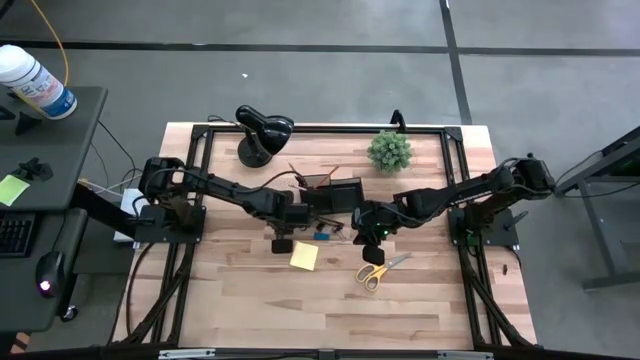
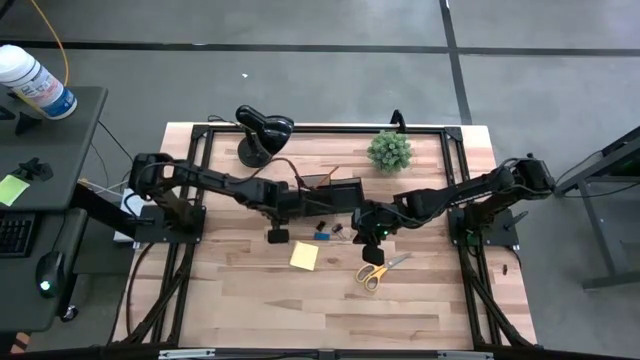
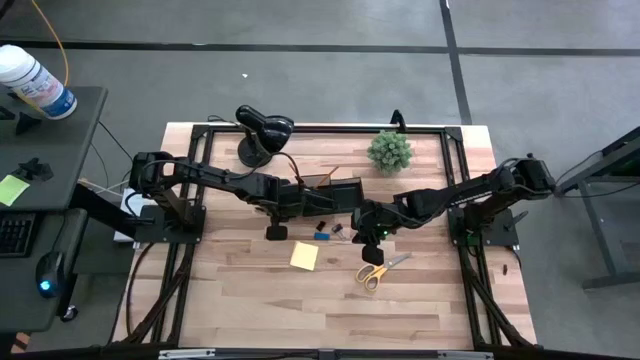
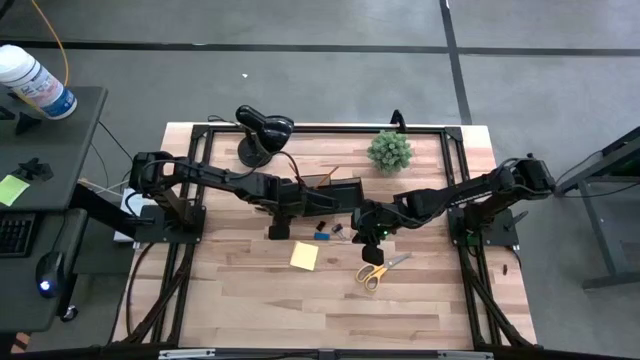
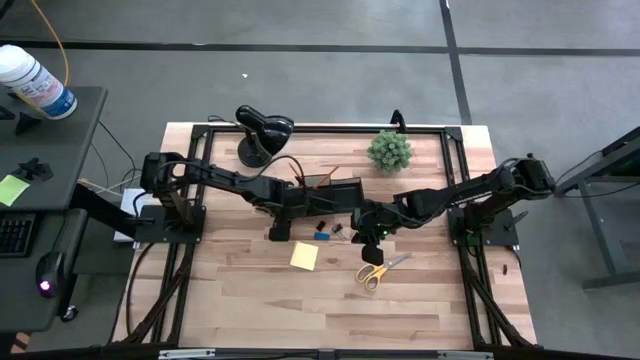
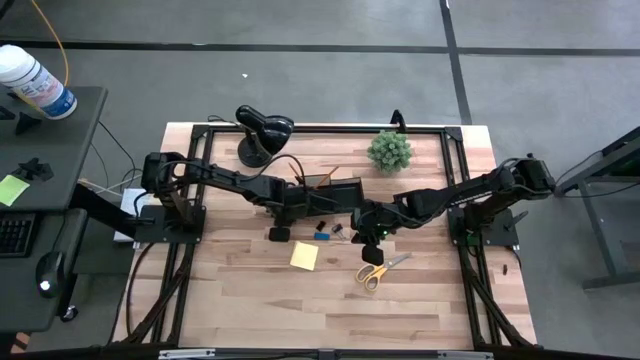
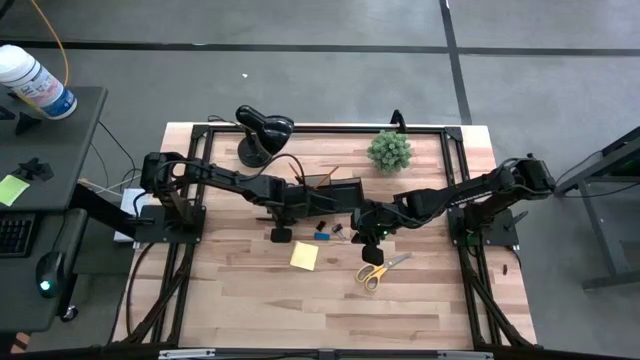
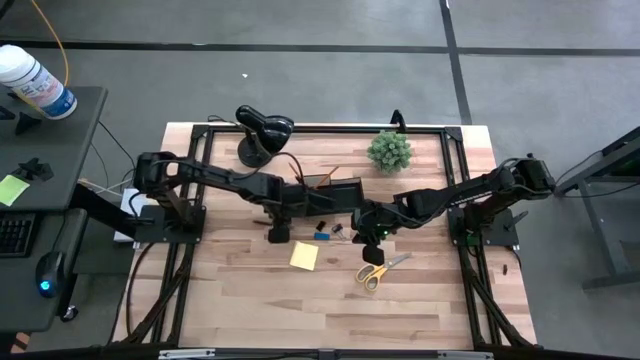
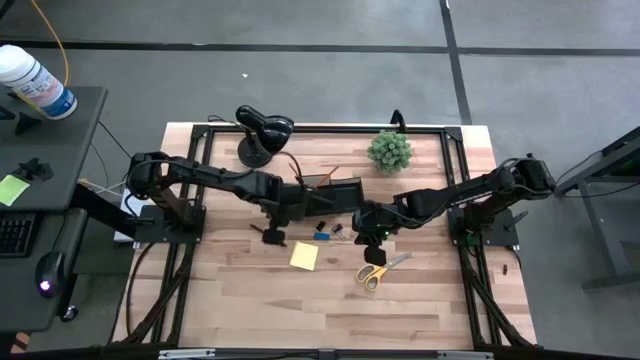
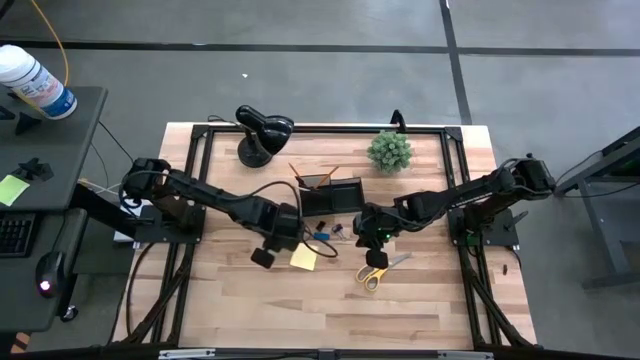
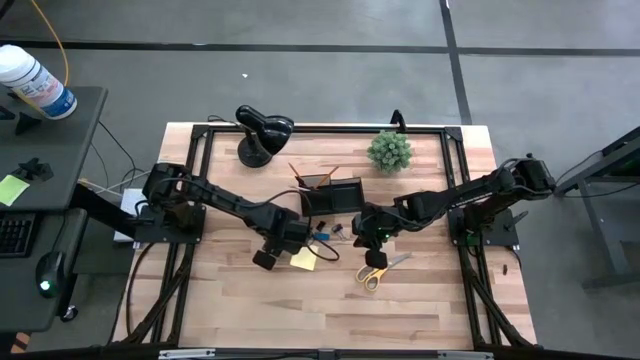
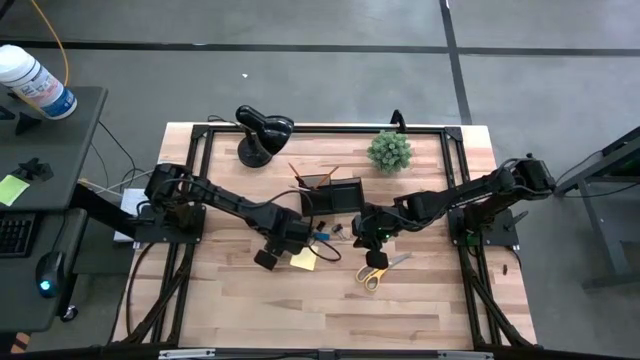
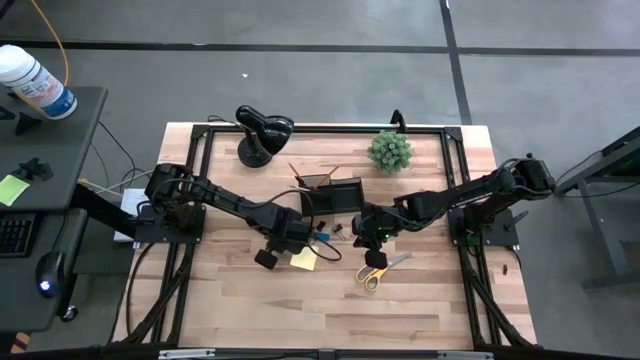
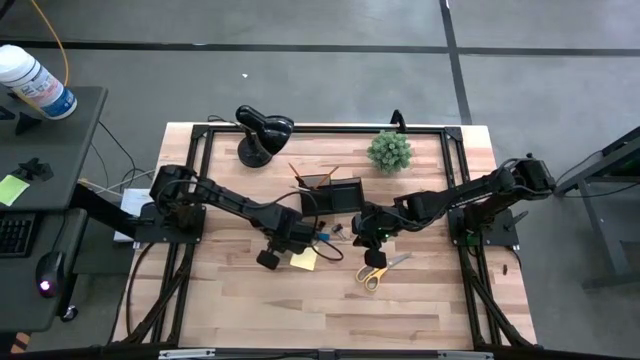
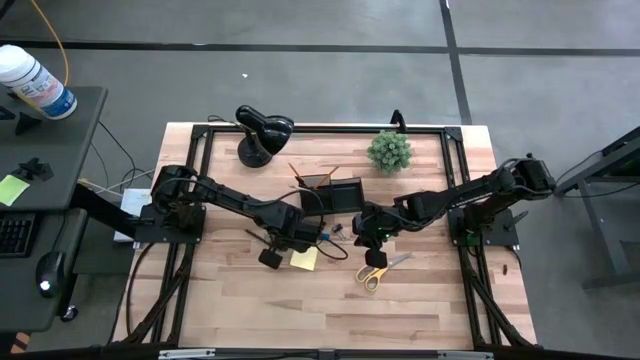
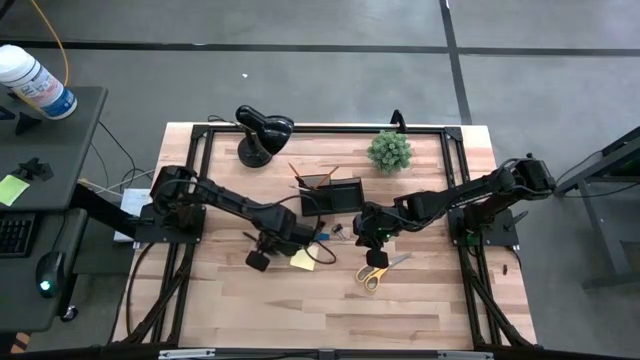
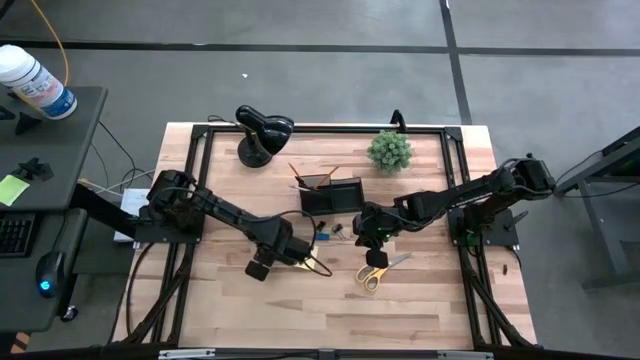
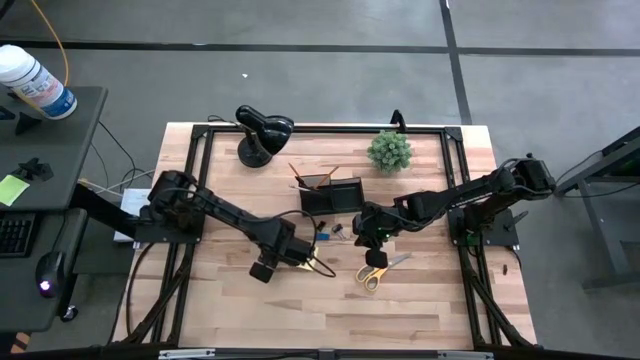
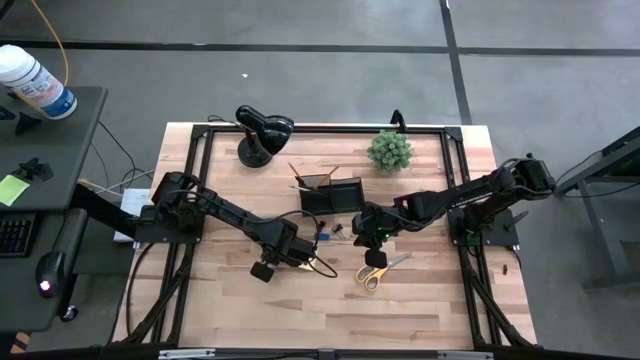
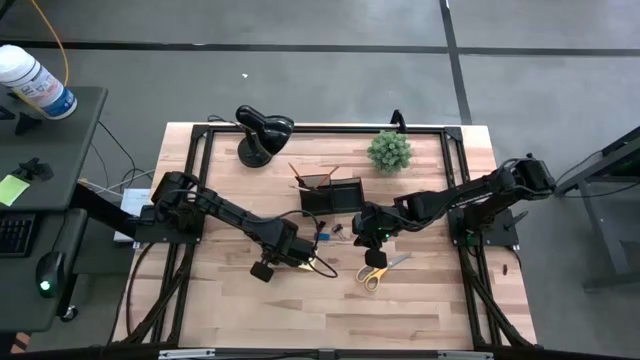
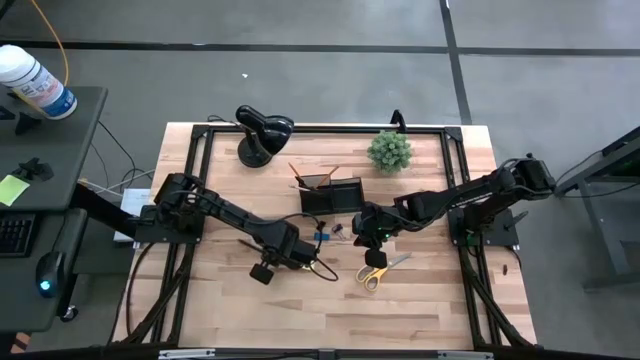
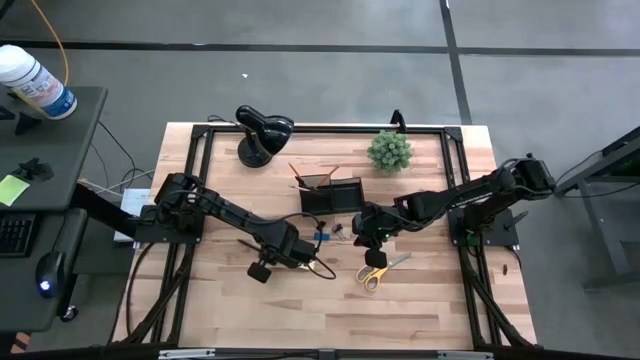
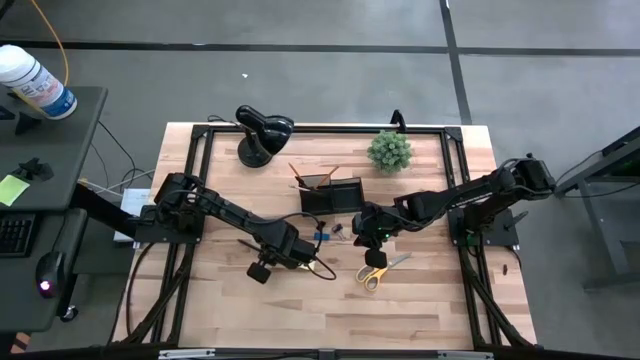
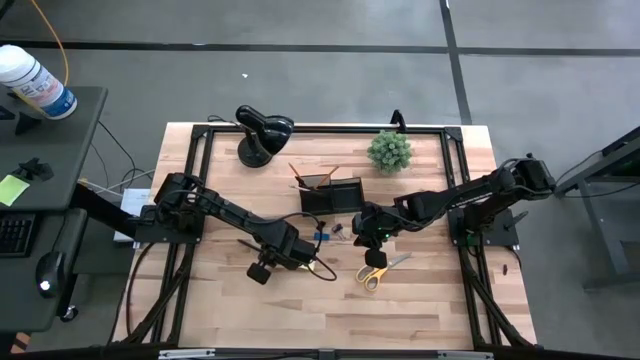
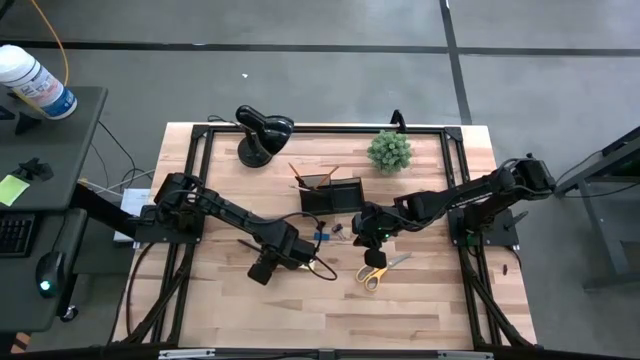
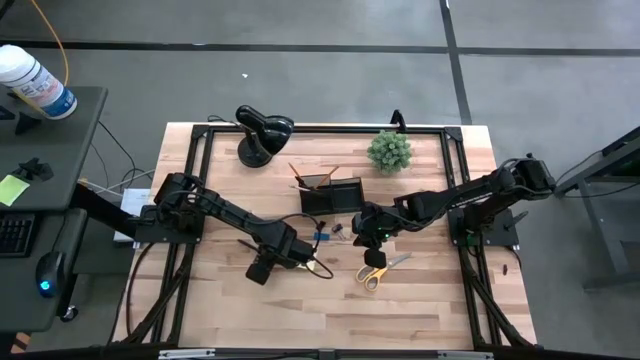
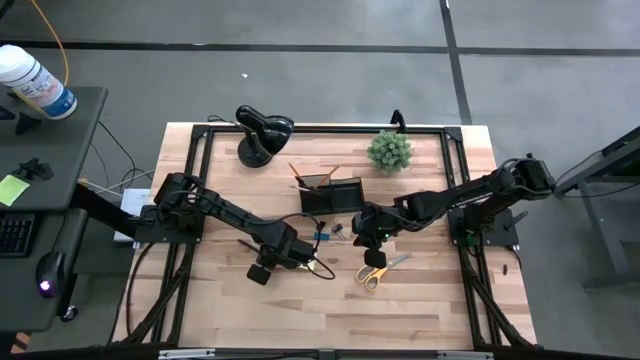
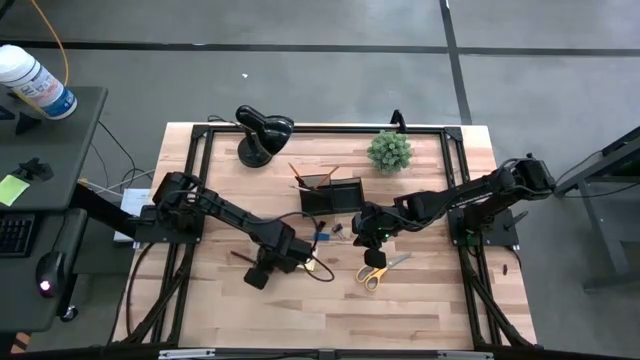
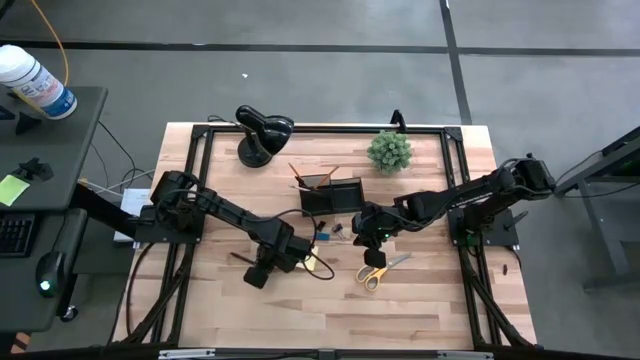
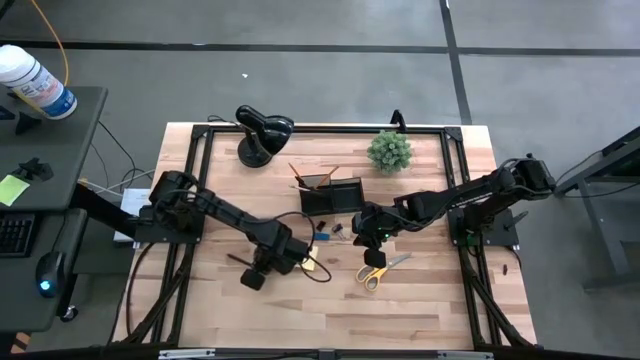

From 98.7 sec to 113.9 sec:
Task: Pick and place office supplies into organizer
Put the black pen into the black desk organizer

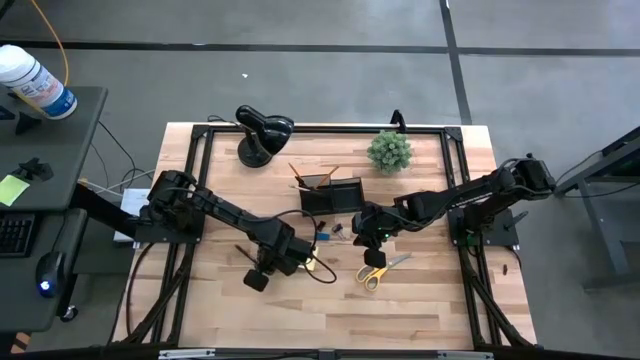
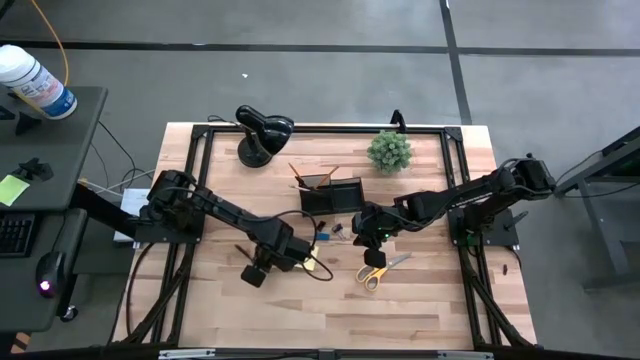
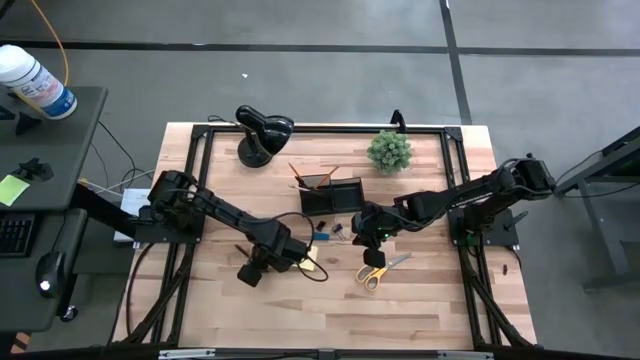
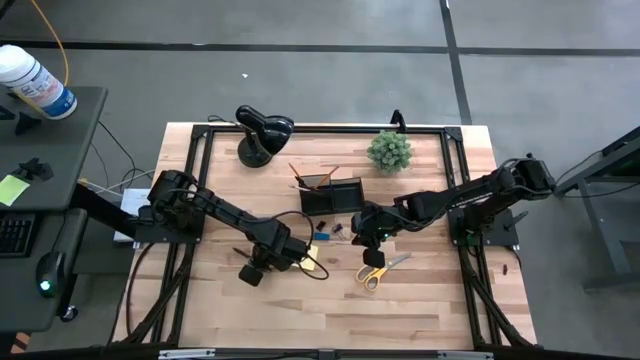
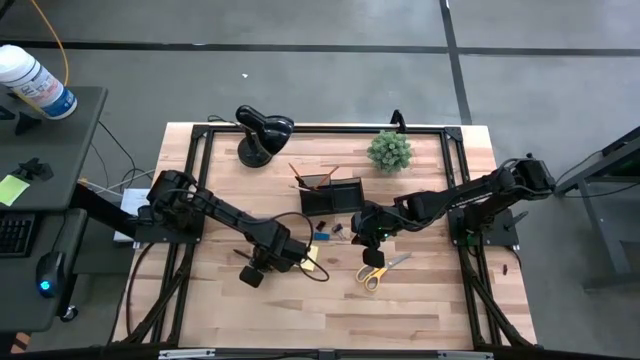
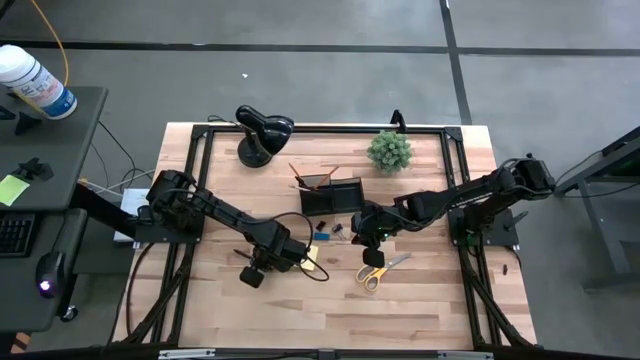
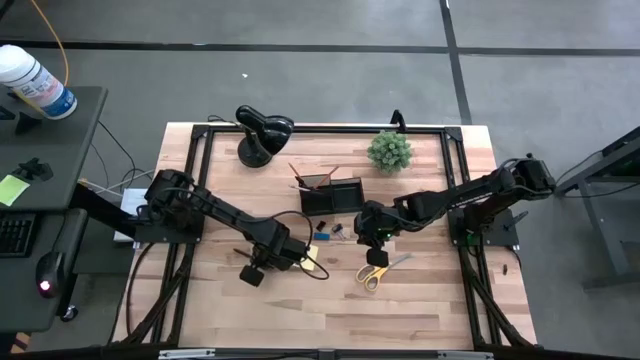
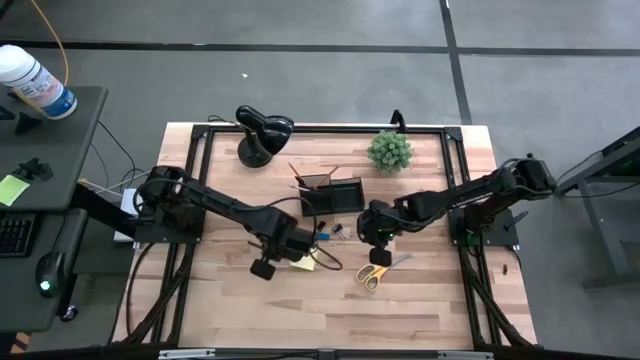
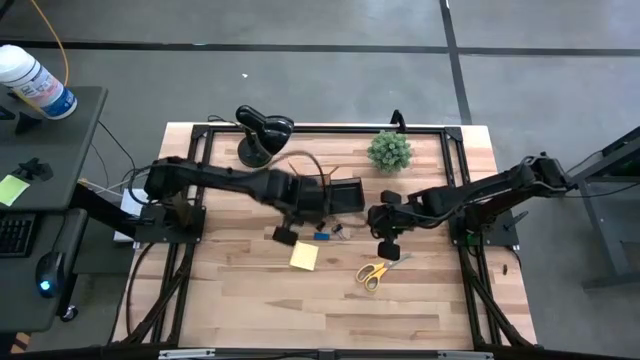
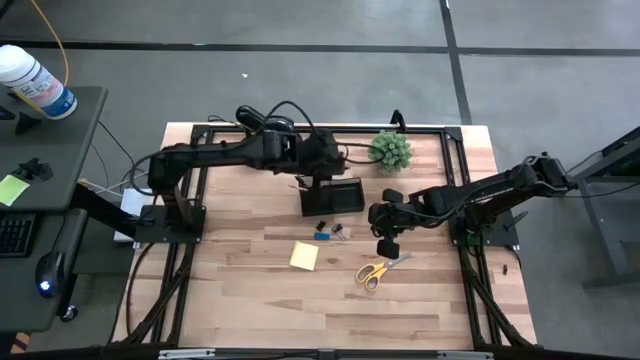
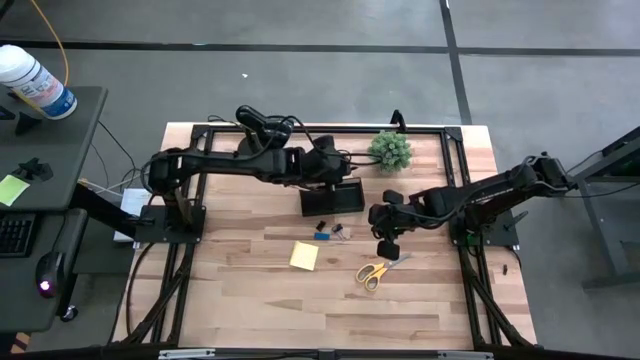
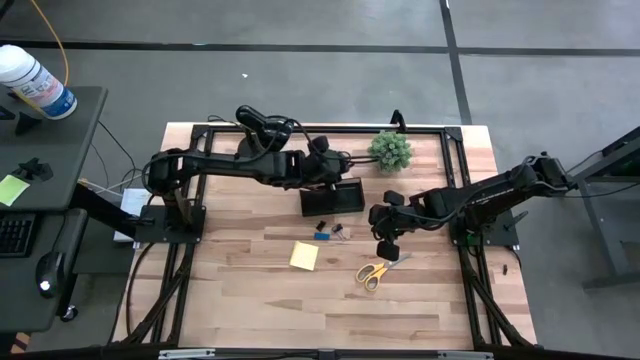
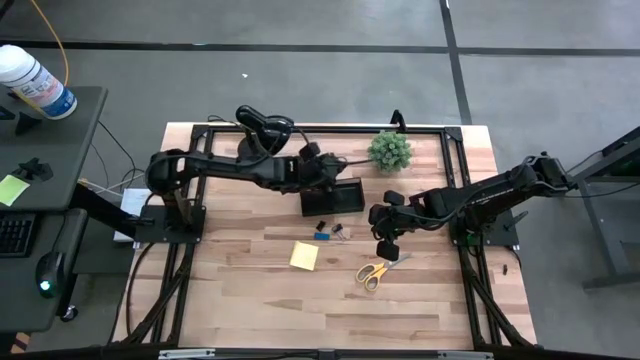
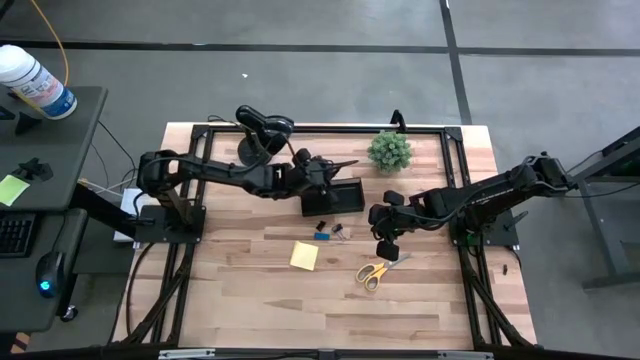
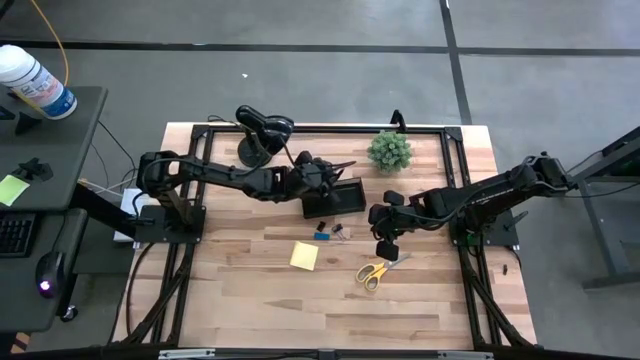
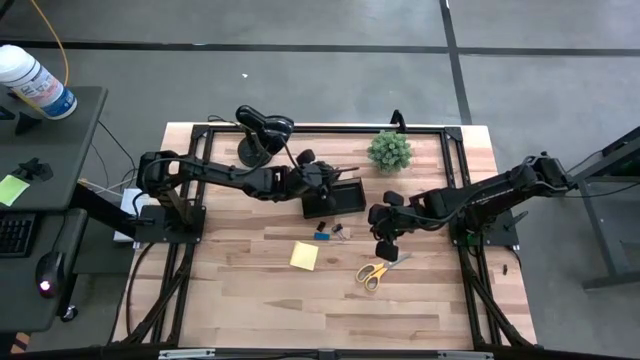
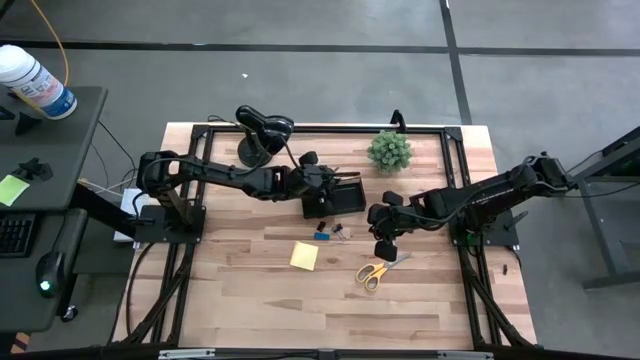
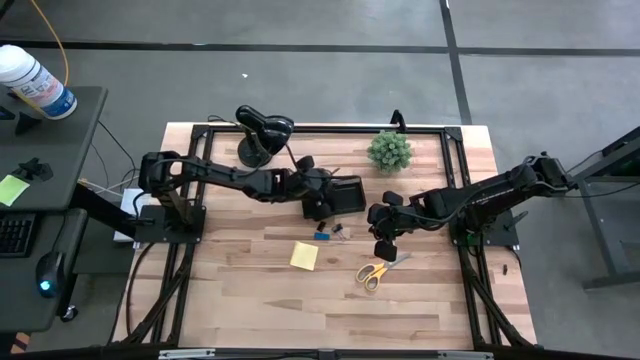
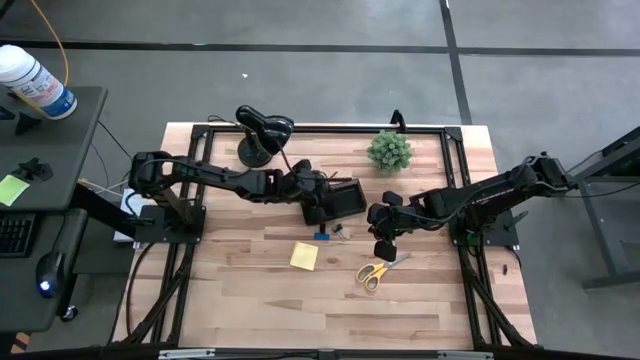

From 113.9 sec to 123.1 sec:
Put the black pen into the black desk organizer
